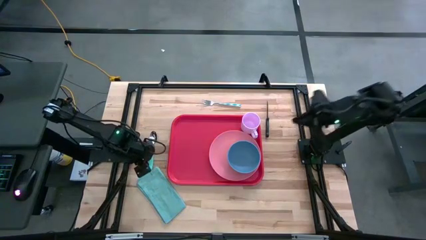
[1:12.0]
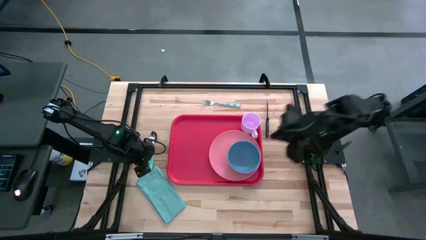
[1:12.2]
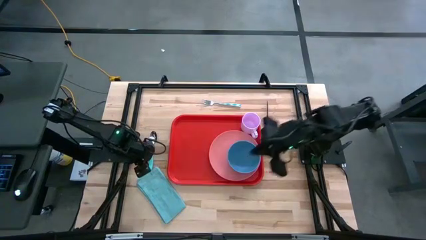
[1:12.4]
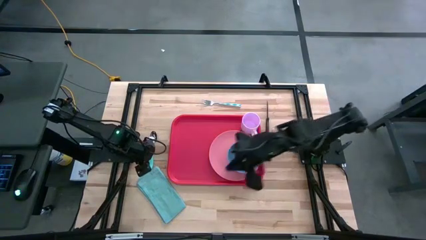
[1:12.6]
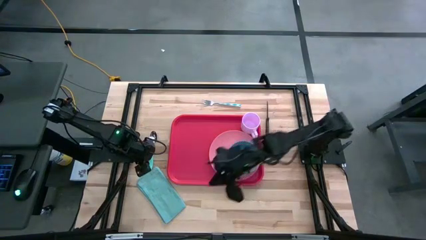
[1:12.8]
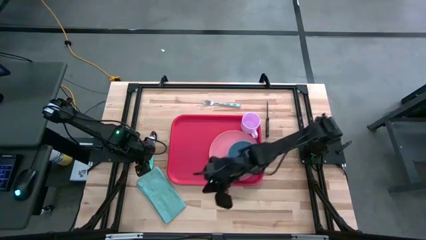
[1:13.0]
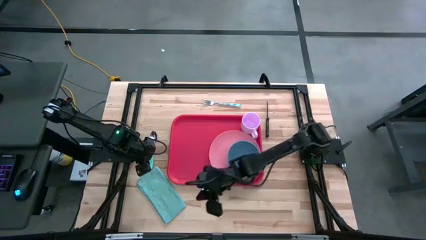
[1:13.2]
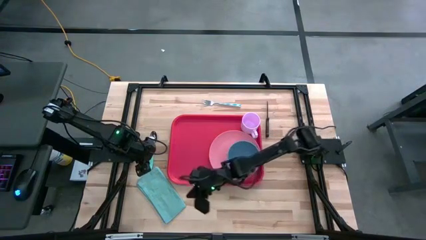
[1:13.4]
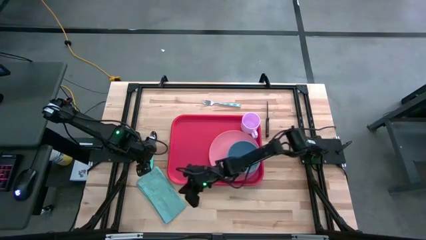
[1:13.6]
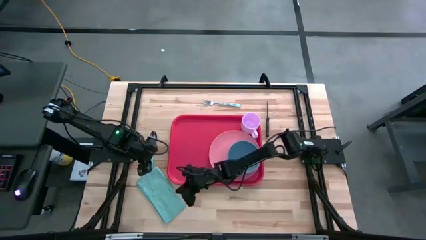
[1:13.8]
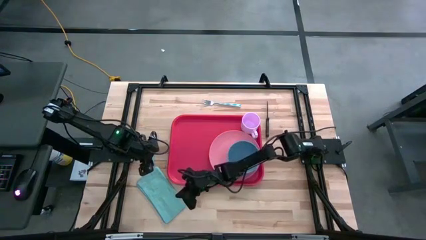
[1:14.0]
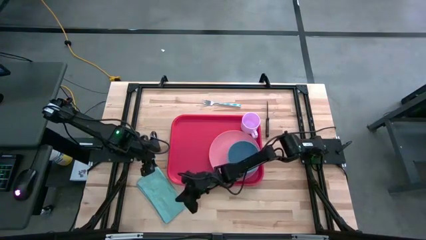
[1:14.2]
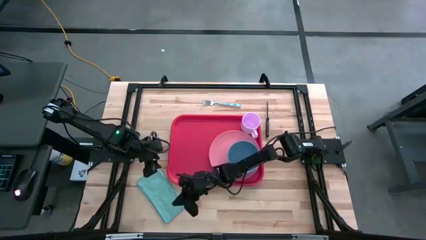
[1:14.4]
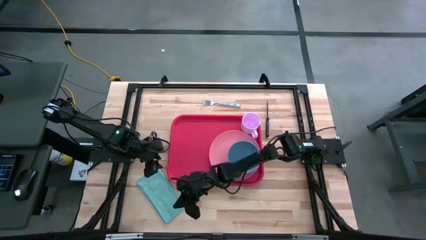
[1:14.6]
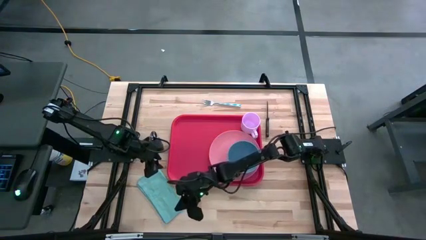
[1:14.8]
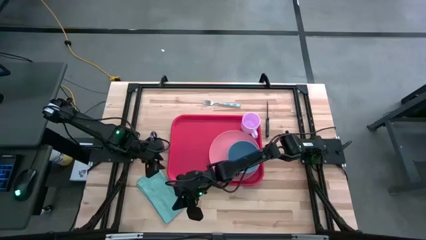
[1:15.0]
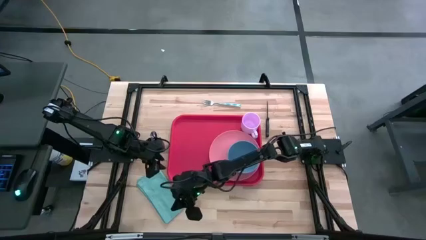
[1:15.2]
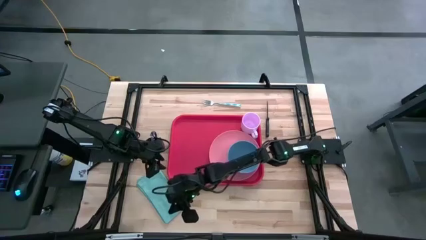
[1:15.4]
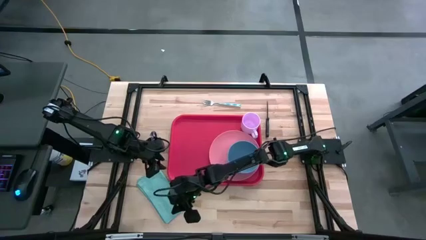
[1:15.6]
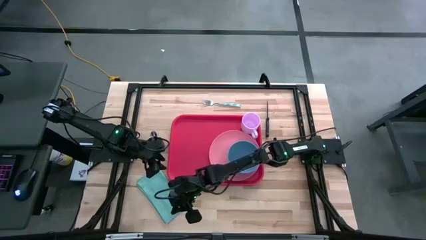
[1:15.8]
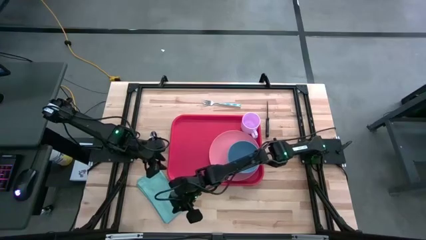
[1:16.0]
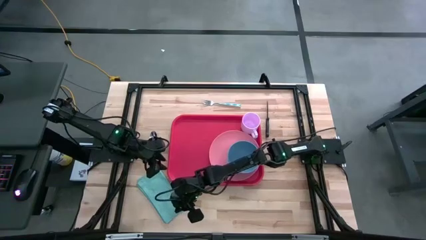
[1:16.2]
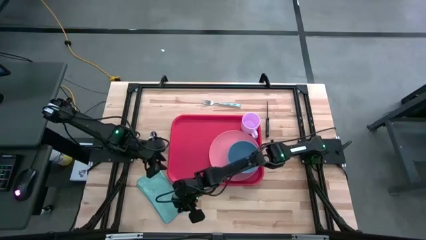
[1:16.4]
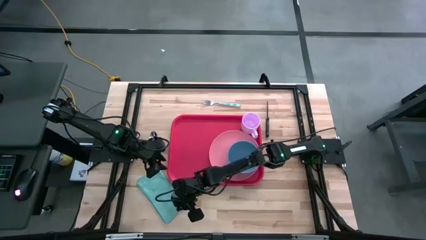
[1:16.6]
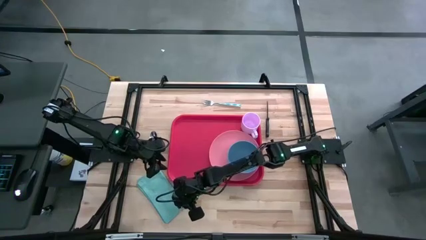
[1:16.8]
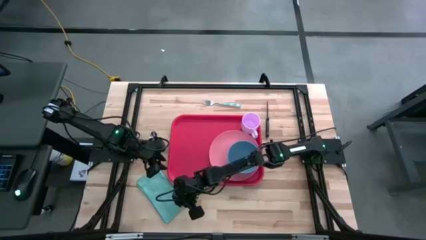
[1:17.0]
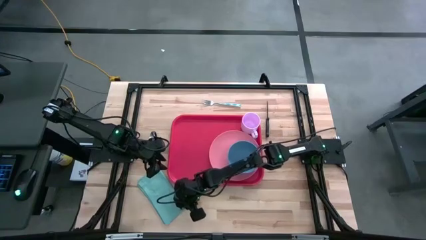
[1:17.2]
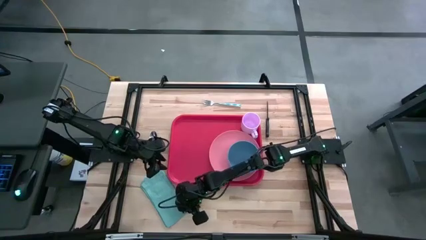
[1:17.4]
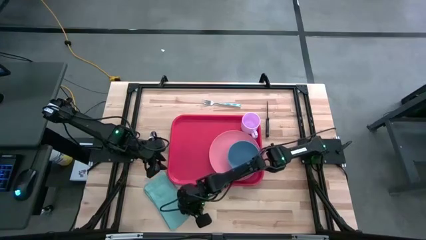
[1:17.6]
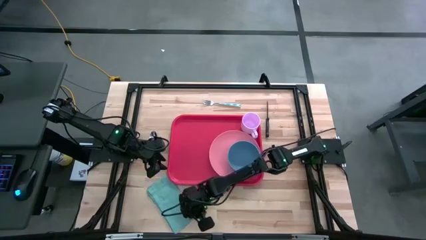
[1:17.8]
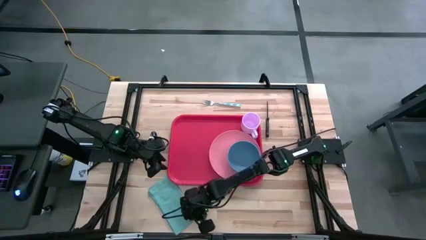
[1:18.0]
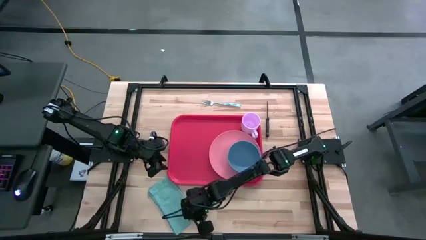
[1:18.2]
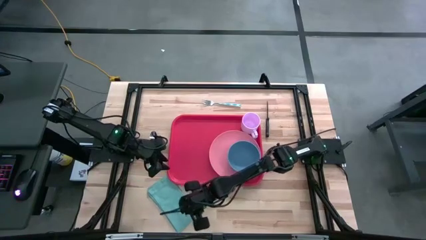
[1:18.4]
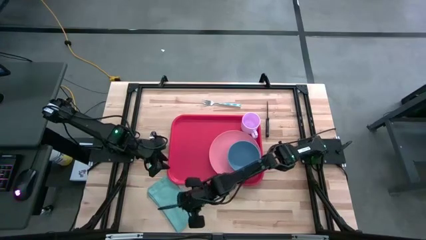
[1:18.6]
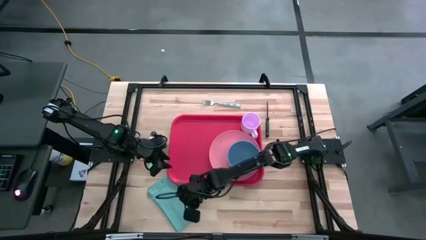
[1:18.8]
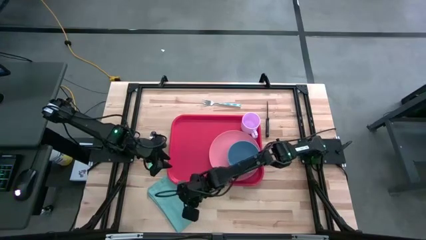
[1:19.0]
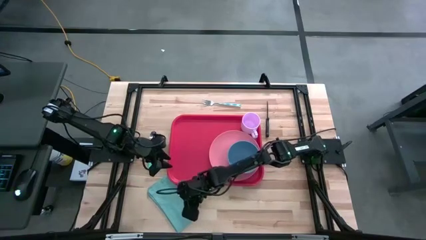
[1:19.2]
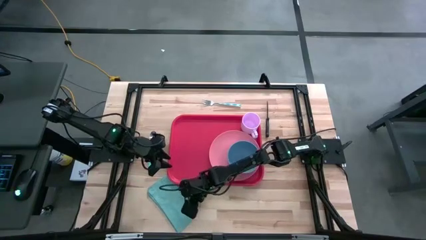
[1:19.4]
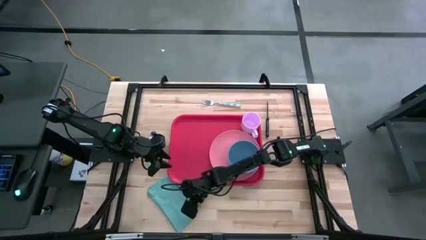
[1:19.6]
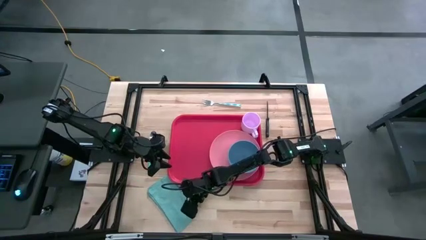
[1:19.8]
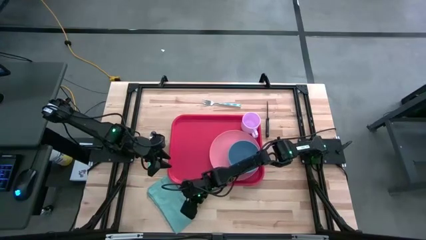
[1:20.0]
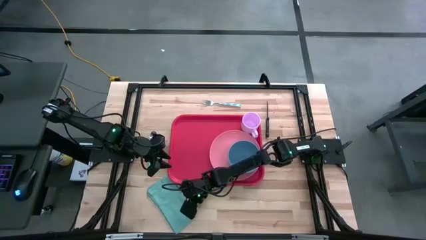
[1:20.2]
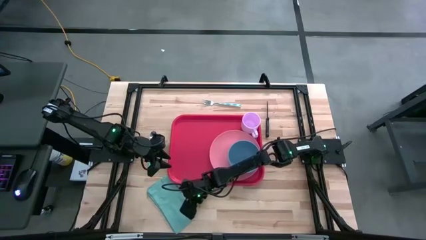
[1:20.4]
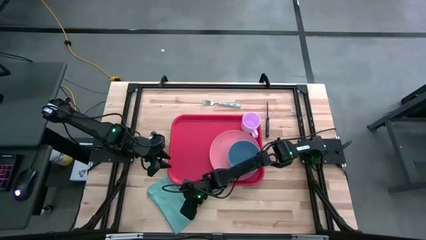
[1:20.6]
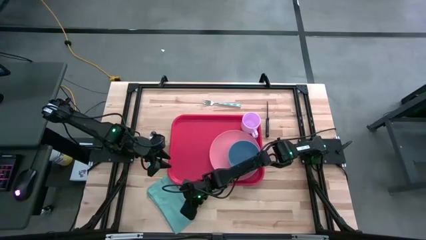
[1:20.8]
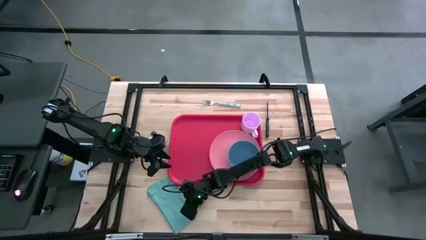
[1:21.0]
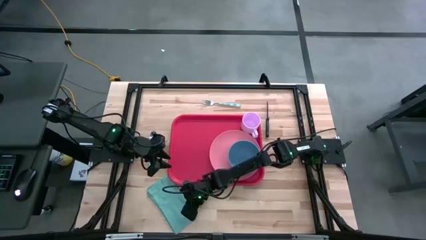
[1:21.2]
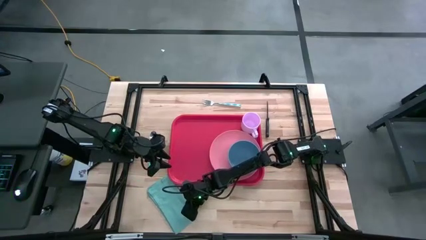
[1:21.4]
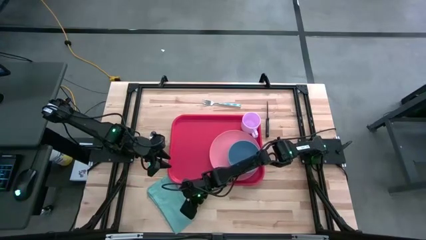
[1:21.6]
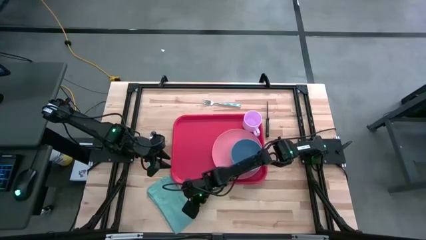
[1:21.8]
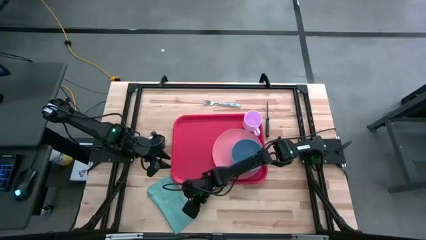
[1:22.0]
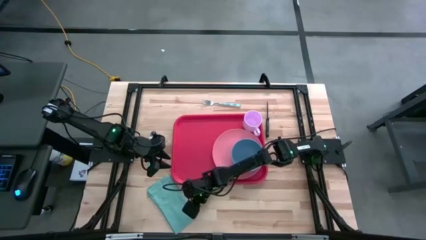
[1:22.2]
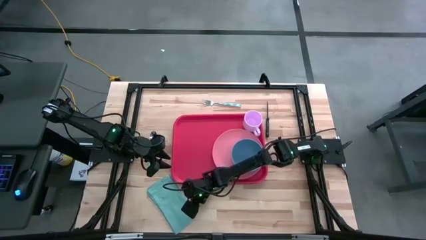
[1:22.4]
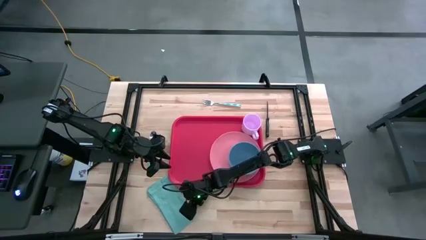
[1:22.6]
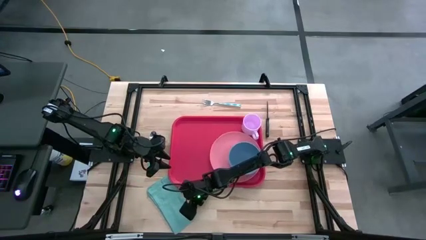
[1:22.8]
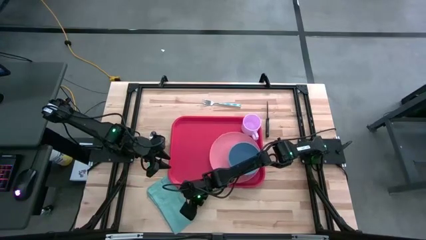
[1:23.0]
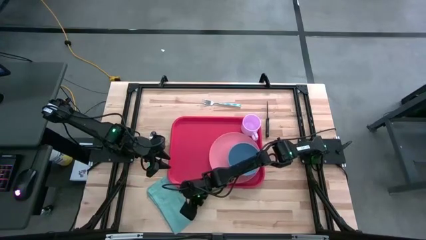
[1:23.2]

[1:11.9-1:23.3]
Task: Set up tray
Put the blue napkin on the red tray to the left of the pink plate

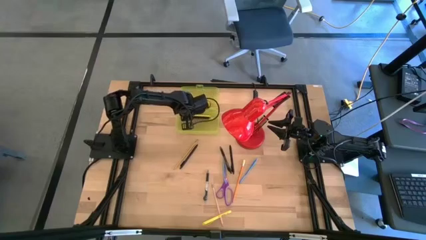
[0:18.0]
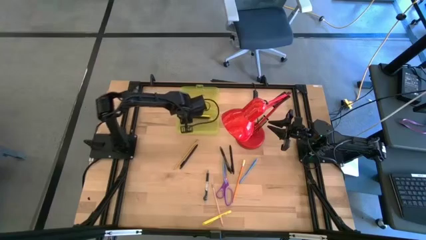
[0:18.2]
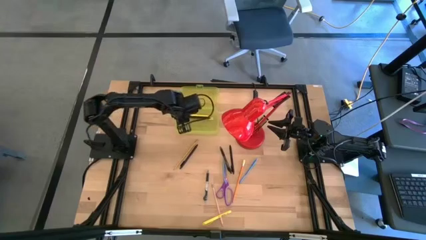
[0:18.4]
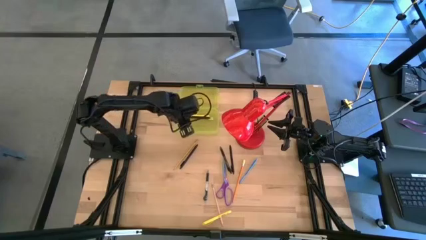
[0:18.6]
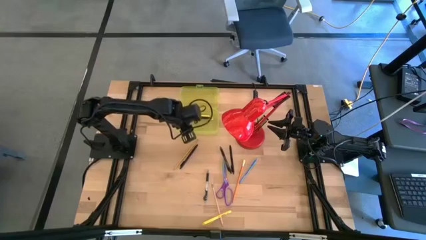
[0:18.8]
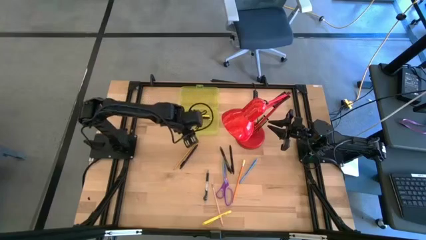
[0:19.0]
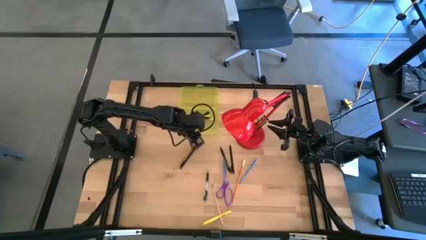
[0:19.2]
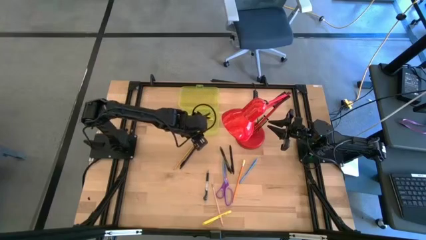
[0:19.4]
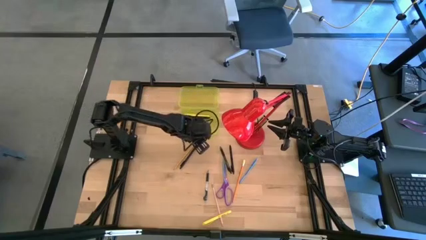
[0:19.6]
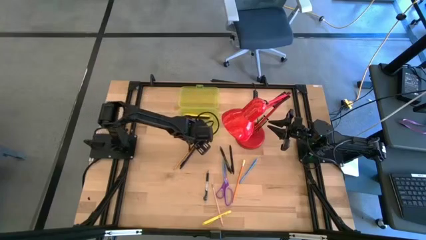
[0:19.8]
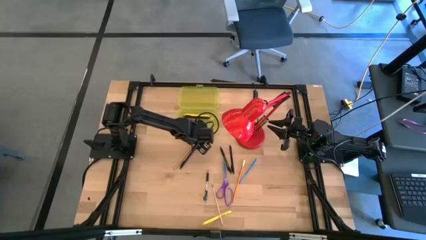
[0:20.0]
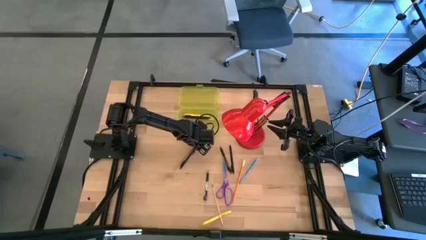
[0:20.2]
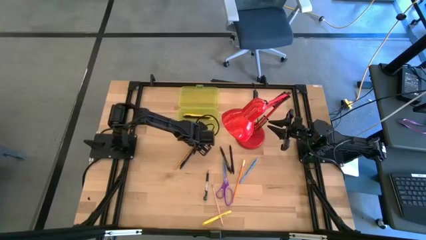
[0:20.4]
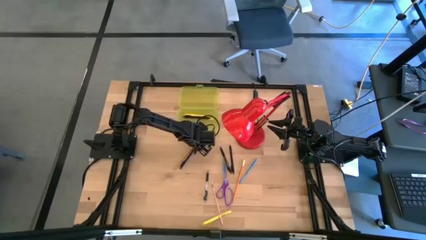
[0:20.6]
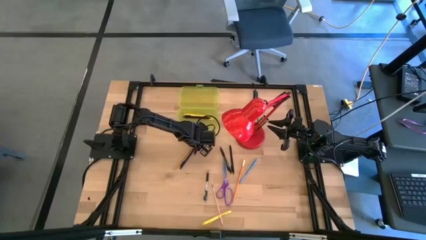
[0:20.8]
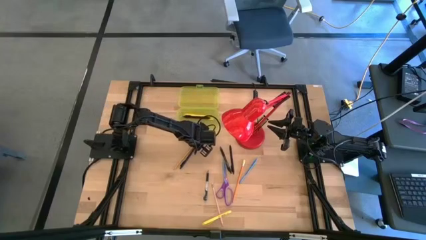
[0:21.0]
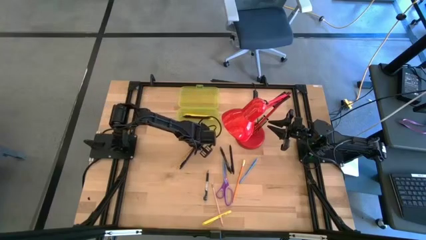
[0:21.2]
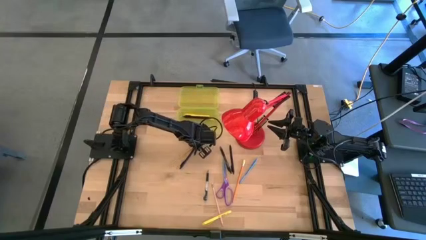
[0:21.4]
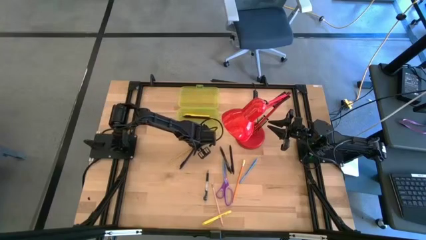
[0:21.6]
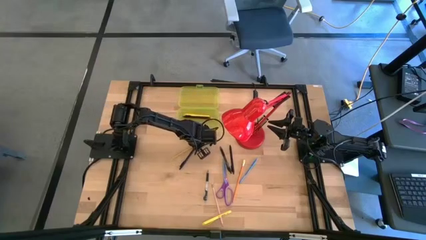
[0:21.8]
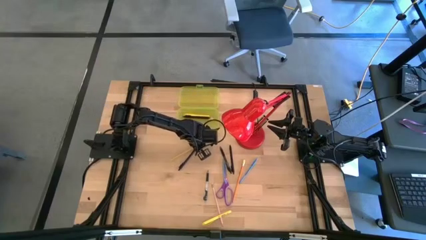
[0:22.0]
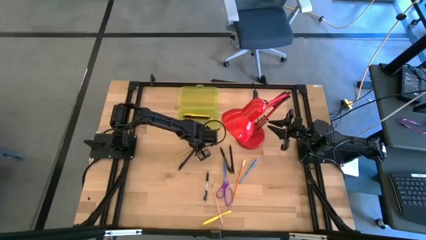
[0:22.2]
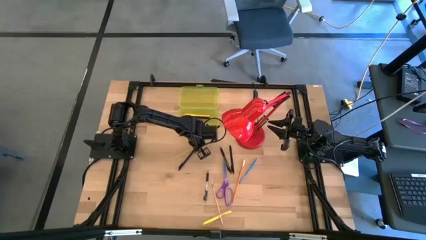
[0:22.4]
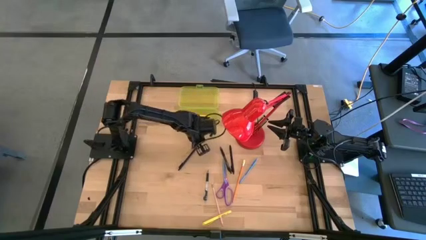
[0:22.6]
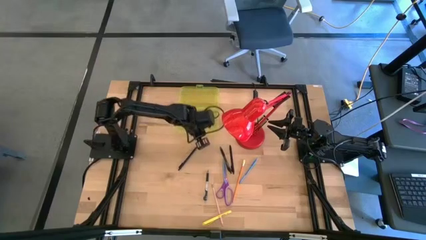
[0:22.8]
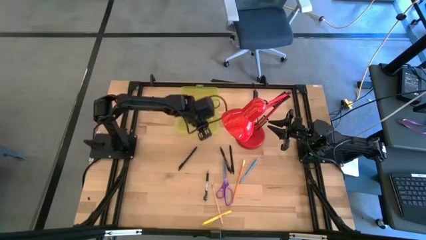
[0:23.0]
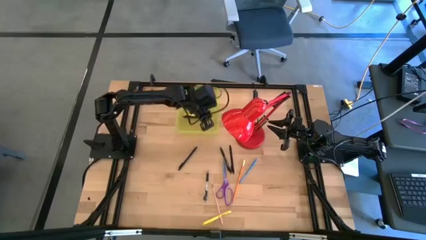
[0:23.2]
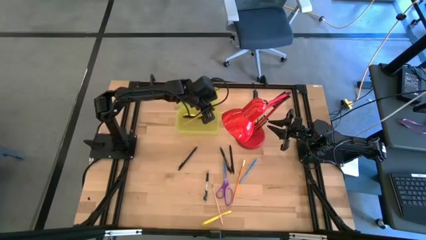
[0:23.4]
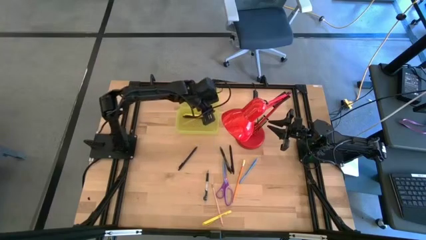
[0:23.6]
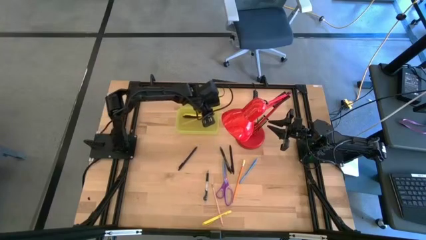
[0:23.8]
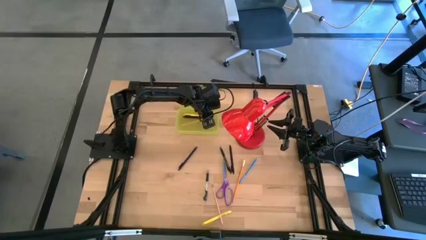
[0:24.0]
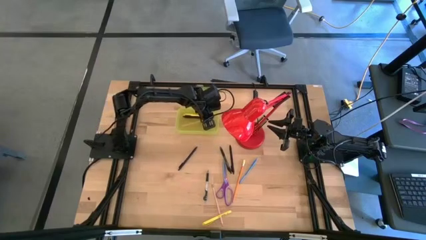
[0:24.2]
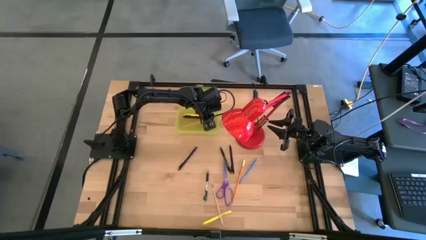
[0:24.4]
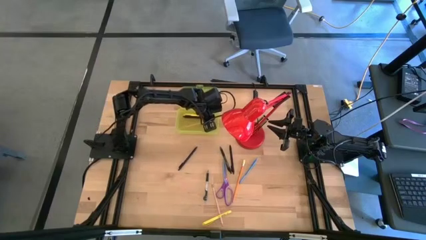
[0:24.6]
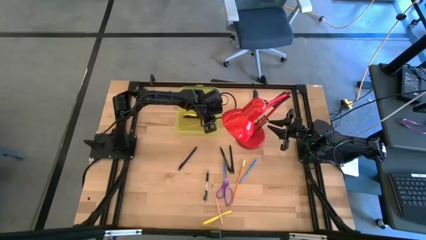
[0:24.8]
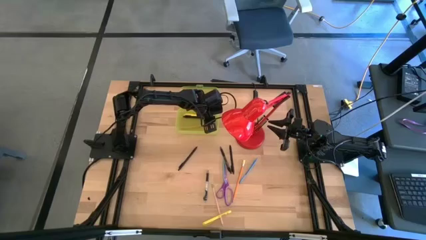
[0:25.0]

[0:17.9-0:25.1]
Task: Pick & place school supplies into a supply box
Put the yellow pencil into the yellow supply box
